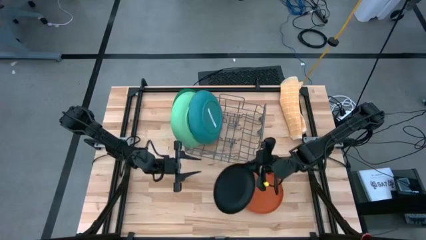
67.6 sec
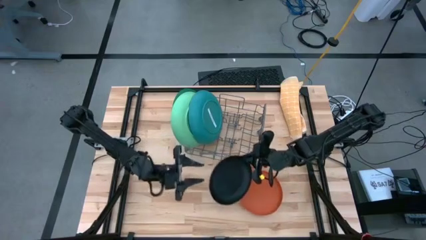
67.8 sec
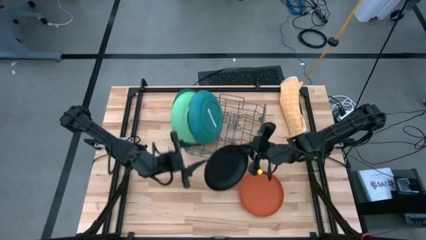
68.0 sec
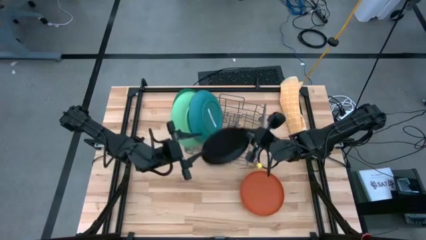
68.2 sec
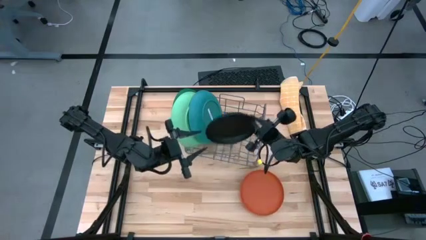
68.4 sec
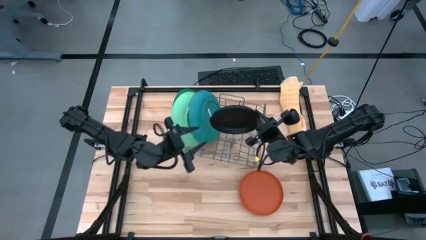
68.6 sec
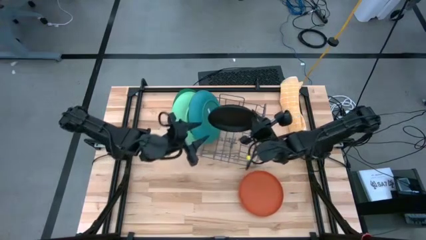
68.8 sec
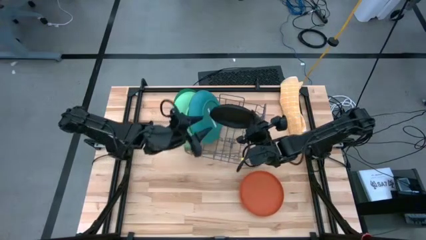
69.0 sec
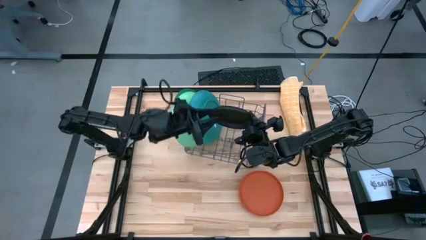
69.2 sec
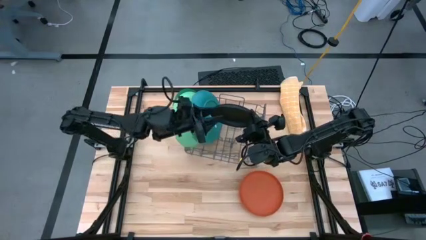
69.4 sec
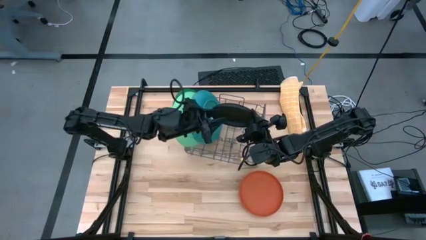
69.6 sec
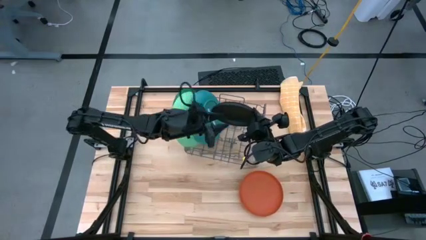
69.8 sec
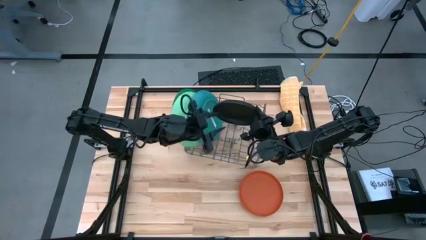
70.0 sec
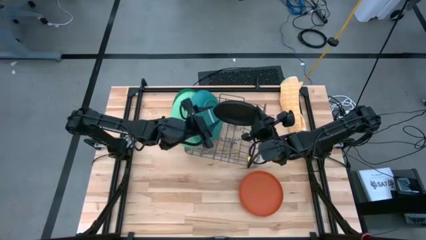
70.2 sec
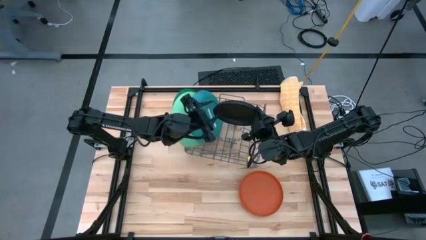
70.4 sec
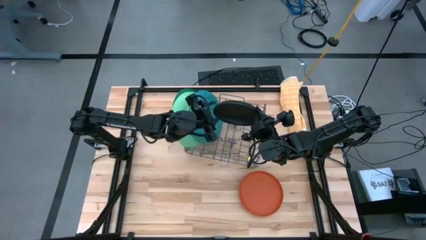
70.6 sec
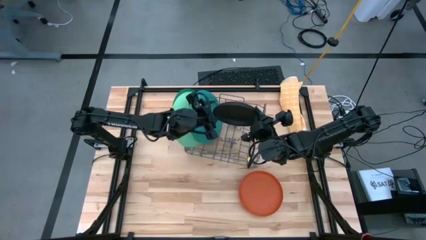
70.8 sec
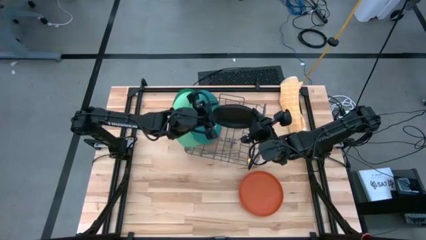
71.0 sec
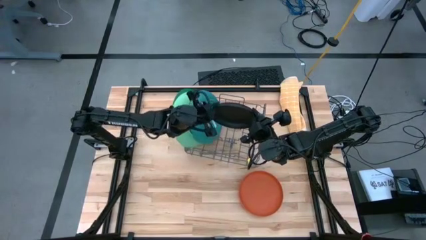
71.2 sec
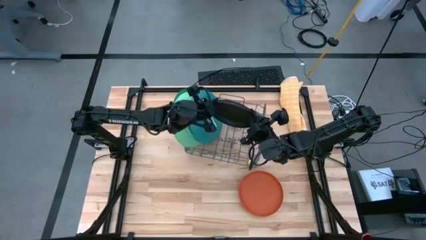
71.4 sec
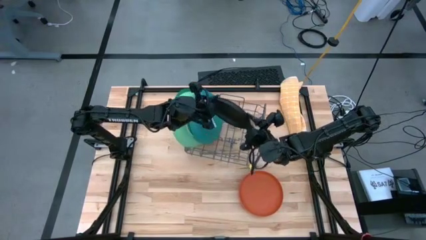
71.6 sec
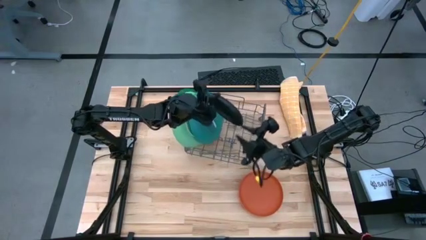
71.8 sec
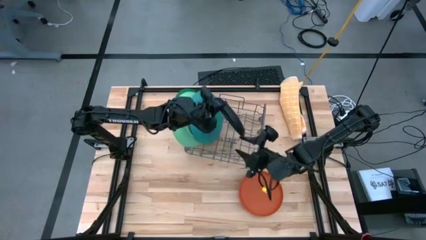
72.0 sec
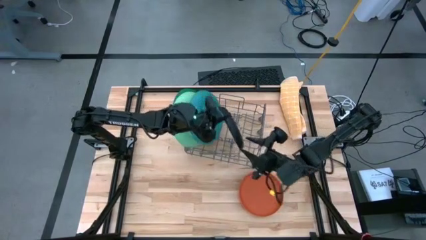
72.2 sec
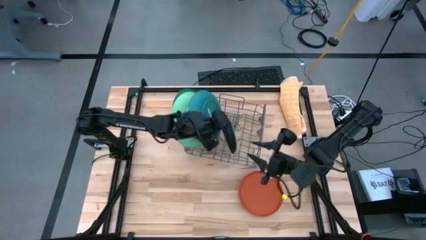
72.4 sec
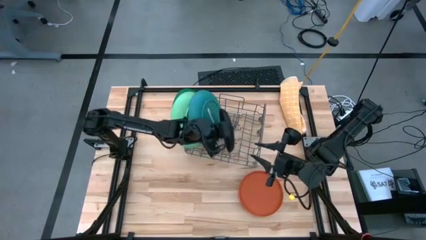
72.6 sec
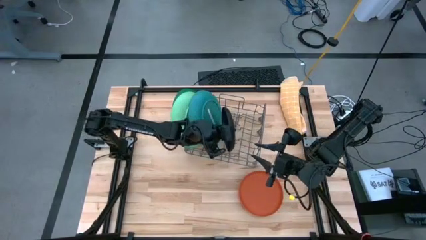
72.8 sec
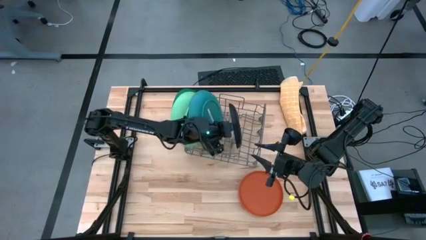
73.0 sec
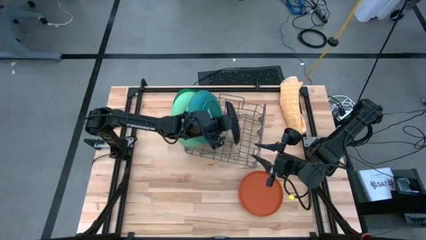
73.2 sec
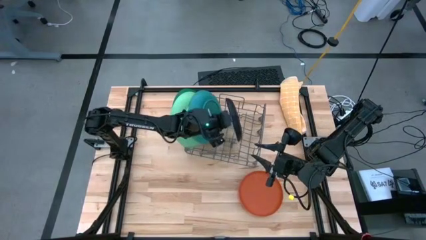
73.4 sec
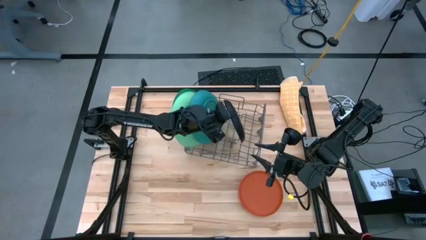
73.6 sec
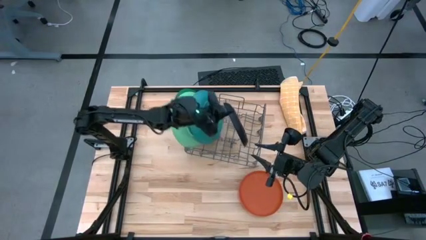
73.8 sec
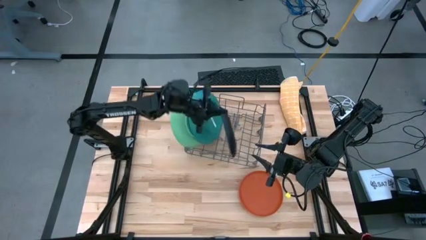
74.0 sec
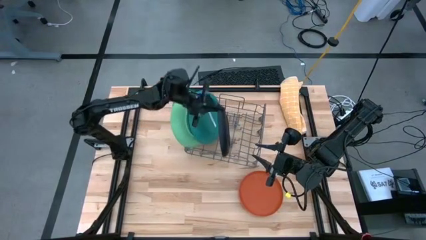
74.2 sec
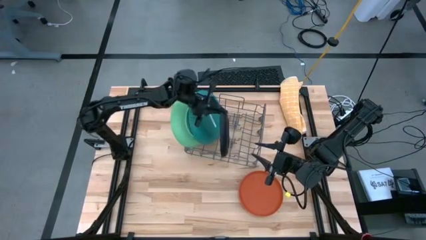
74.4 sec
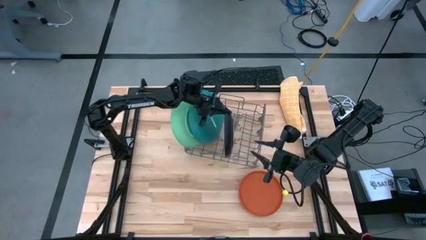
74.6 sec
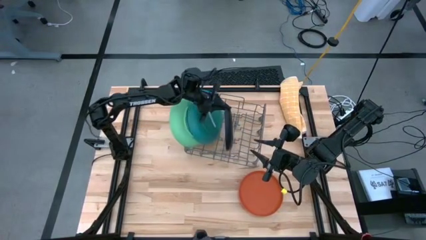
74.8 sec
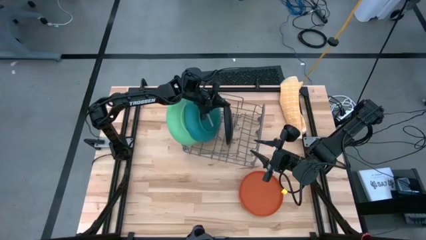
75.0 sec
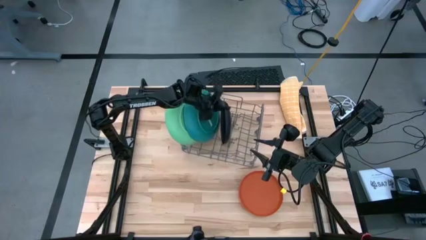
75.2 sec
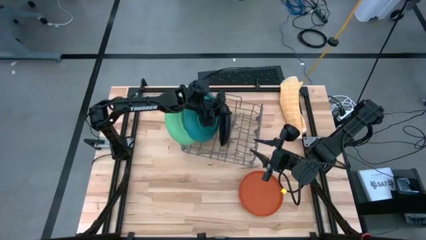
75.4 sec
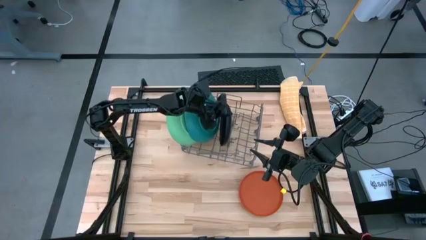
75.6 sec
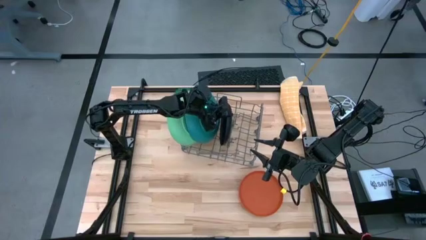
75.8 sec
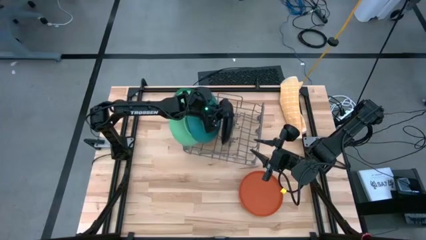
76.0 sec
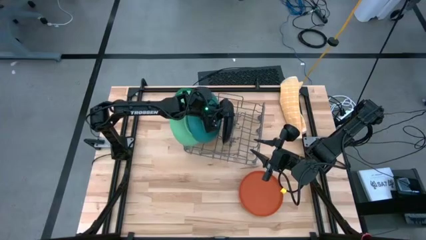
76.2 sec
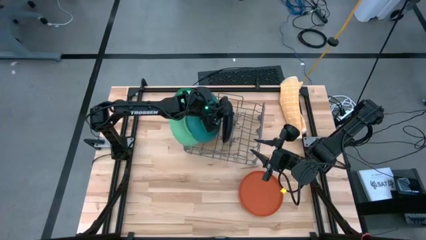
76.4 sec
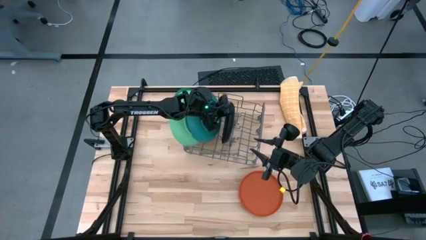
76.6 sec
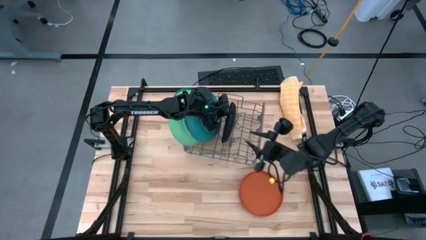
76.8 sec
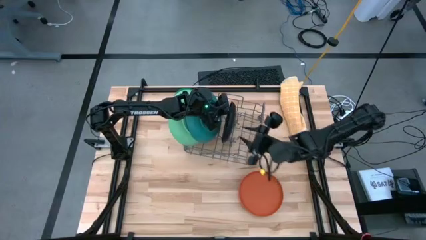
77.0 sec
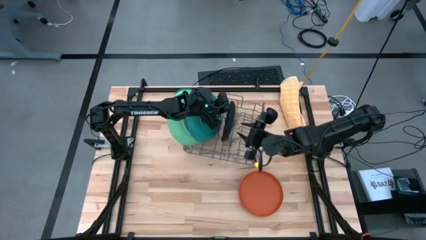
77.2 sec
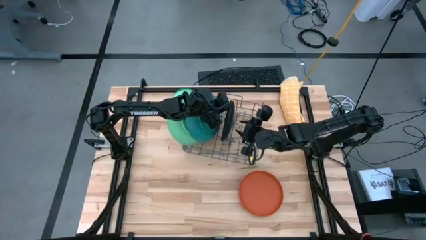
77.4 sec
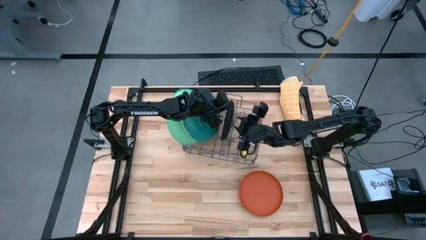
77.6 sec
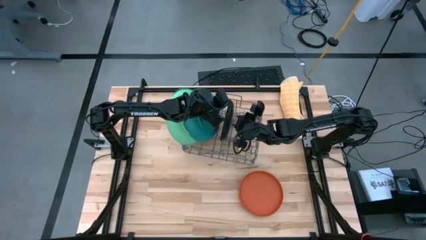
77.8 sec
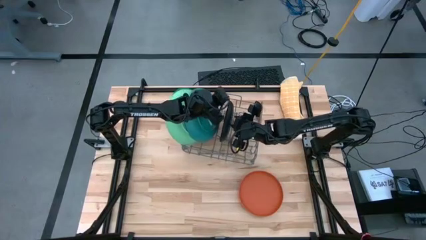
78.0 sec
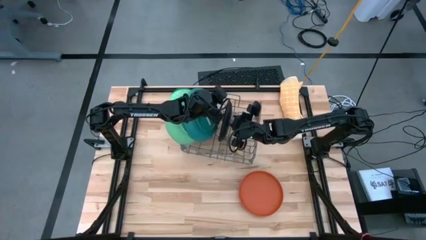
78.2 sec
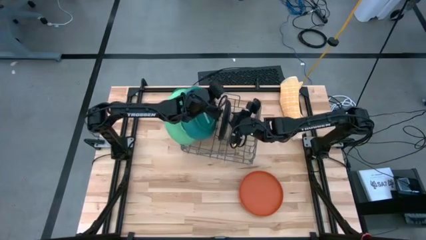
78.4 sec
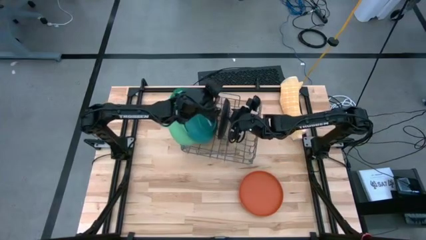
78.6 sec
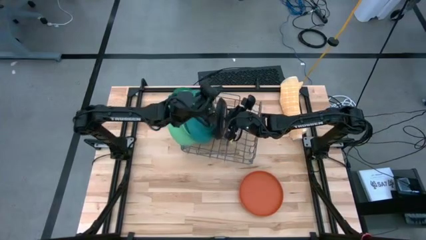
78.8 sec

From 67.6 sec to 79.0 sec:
Task: Sort dishes
Put the black plate into the dish rack

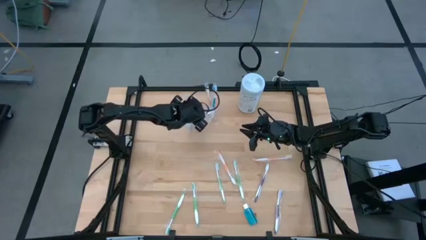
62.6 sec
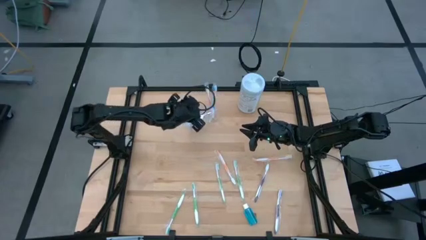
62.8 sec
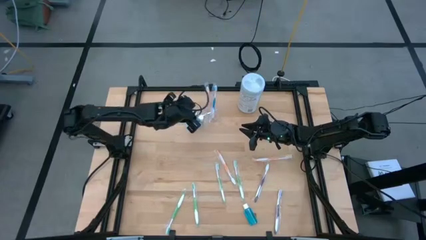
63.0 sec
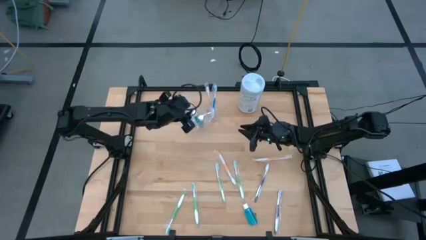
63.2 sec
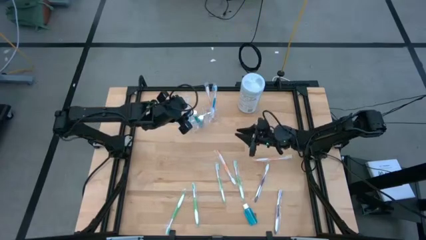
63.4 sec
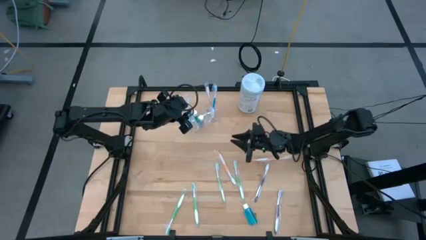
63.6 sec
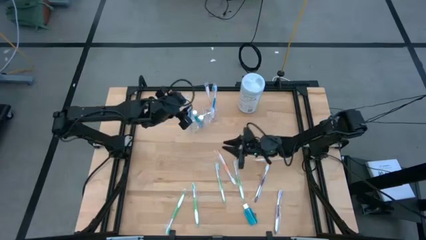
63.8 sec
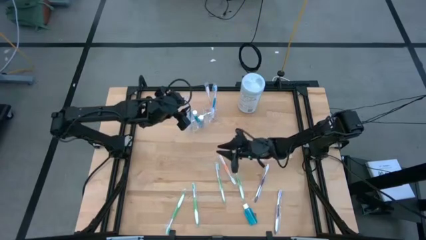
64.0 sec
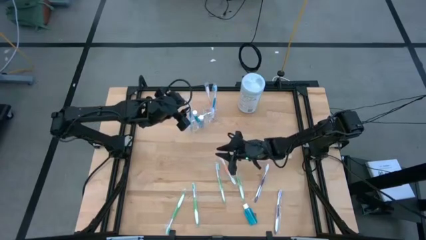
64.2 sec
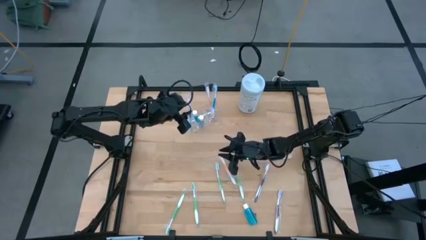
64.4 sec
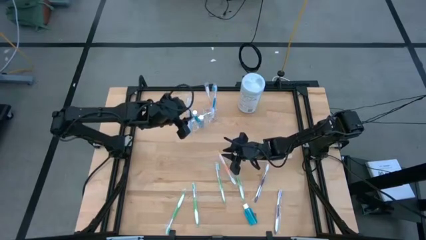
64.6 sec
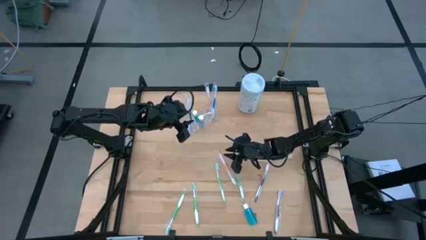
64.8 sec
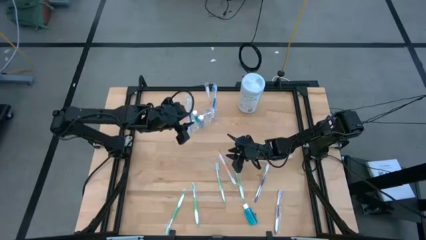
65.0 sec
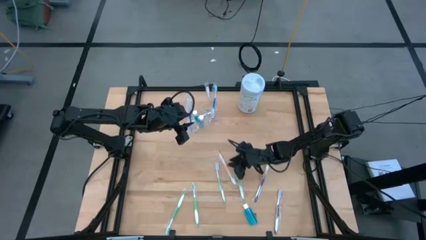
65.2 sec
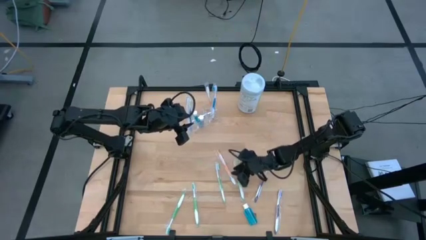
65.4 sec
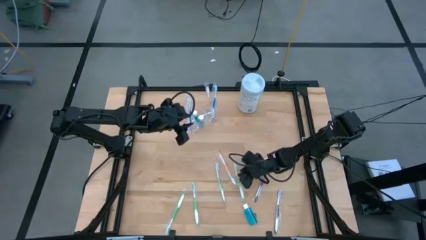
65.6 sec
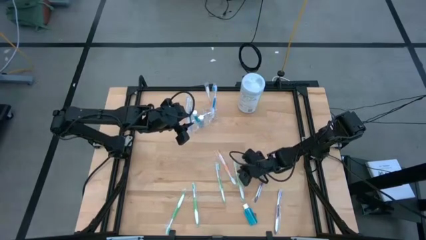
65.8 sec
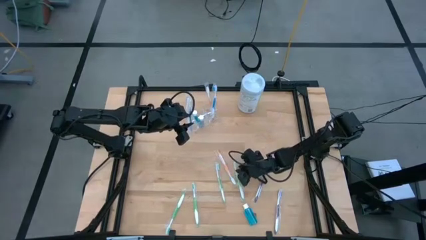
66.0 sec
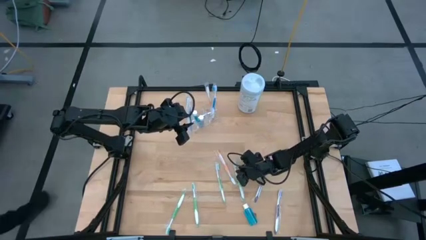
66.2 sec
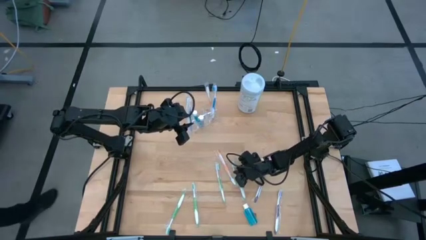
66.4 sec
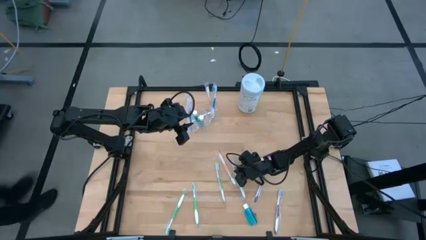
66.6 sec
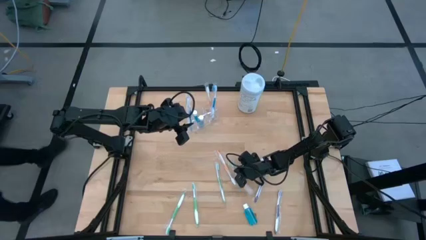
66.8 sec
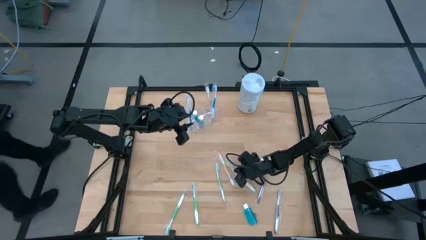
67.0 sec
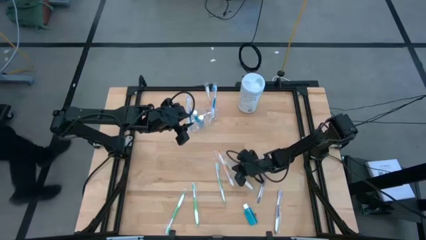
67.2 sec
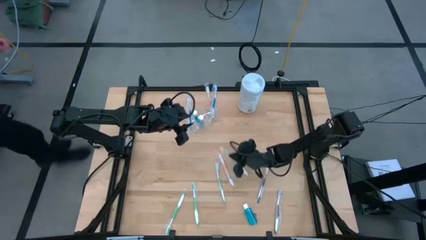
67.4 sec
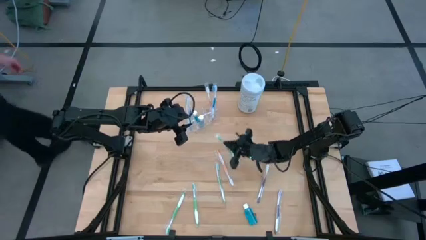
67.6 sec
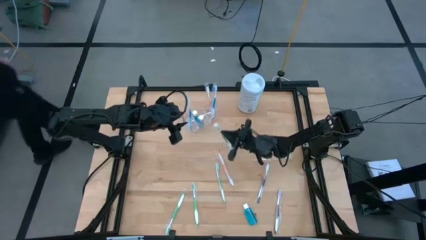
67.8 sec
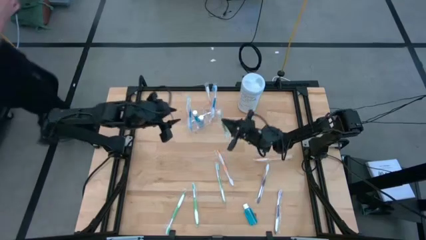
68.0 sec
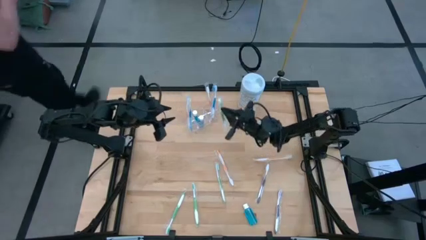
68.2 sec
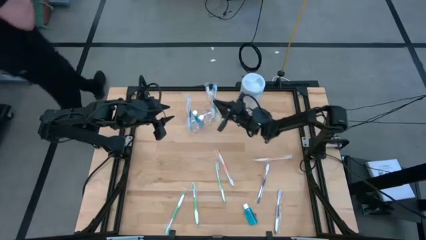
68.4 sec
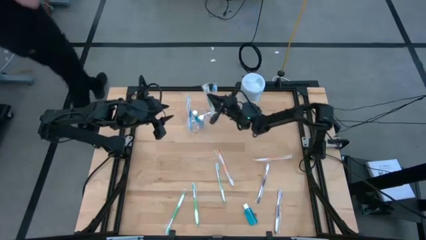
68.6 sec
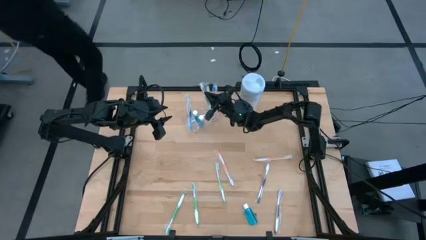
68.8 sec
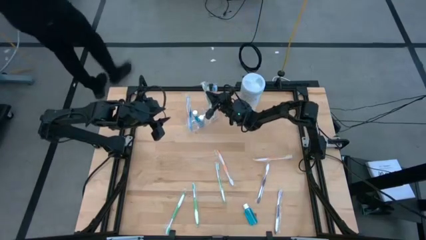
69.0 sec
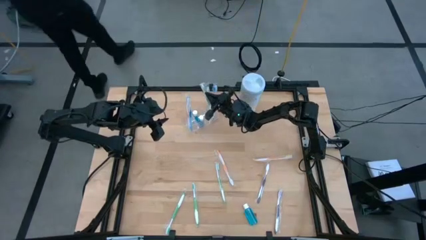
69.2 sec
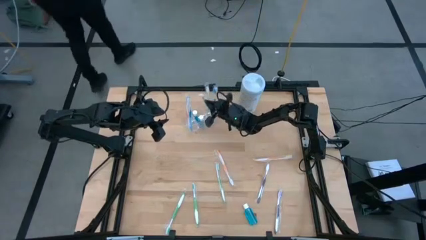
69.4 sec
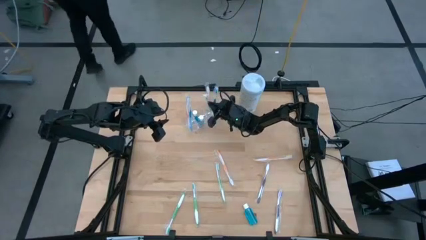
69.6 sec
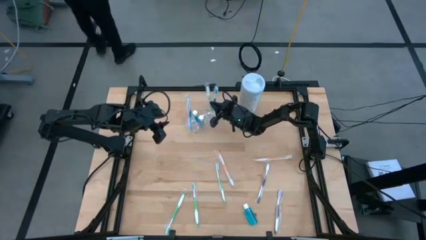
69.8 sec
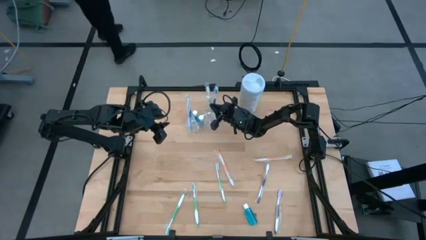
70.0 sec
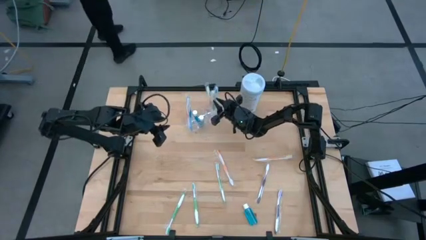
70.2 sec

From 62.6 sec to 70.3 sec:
Task: Pick & Place toothbrushing station
Put the green toothbrush into the transparent organizer
